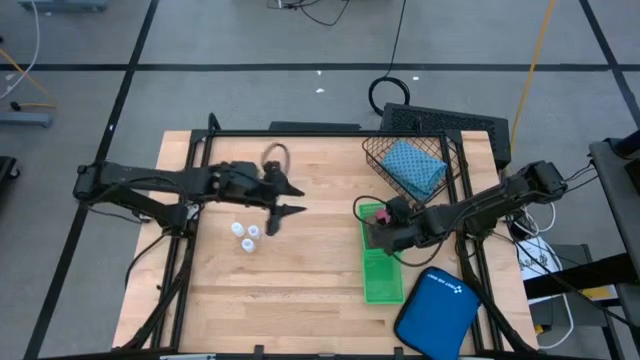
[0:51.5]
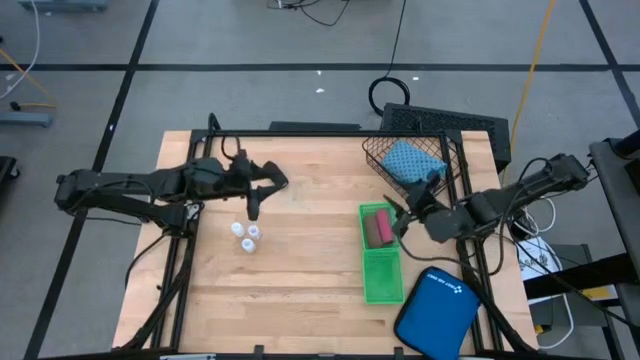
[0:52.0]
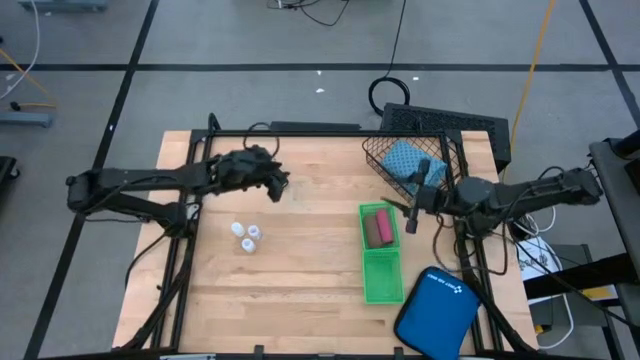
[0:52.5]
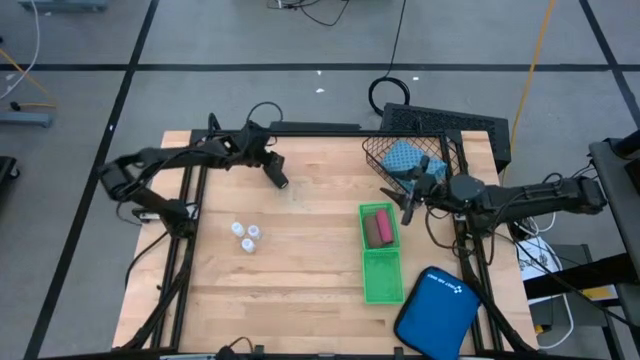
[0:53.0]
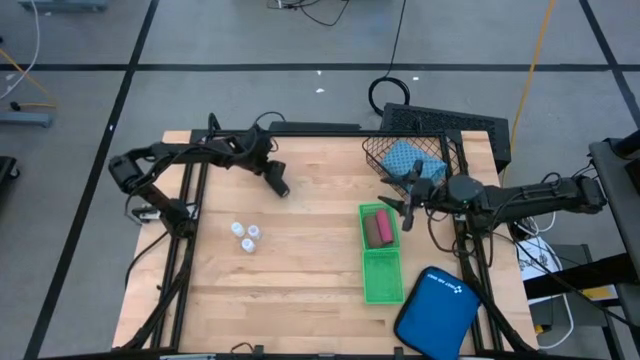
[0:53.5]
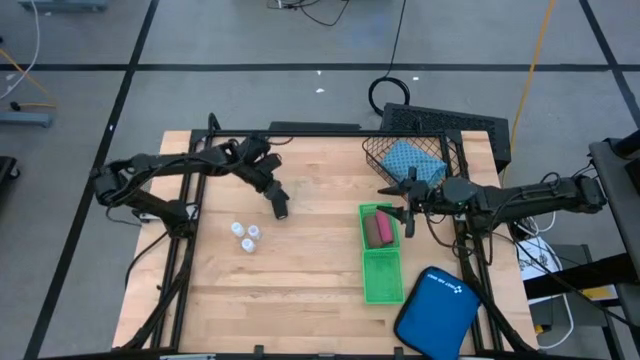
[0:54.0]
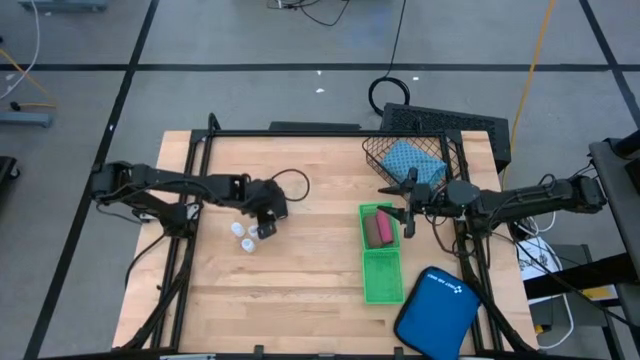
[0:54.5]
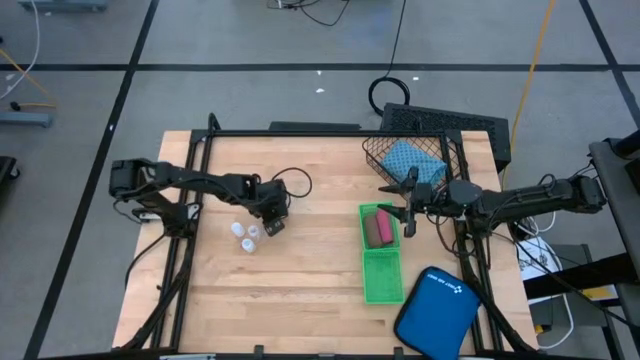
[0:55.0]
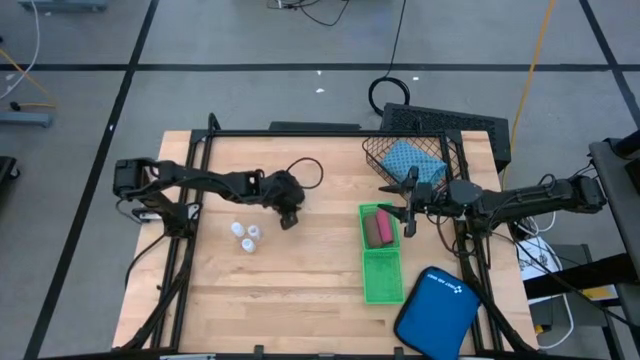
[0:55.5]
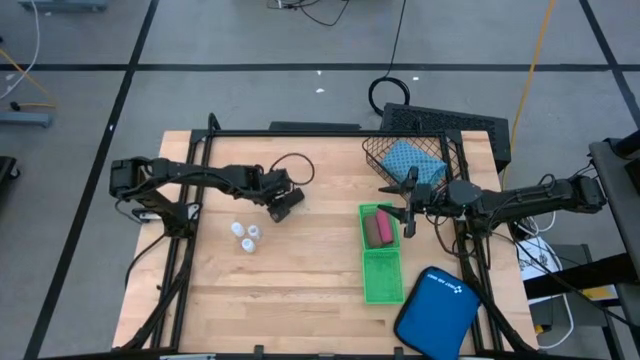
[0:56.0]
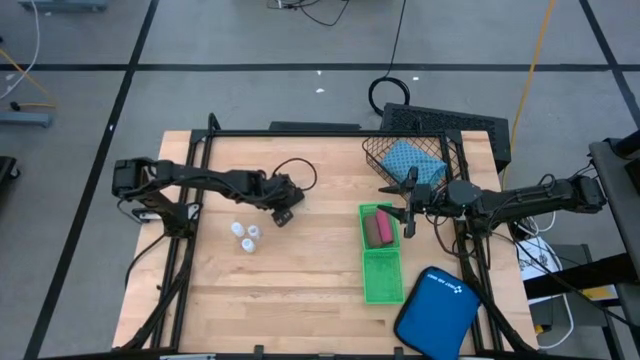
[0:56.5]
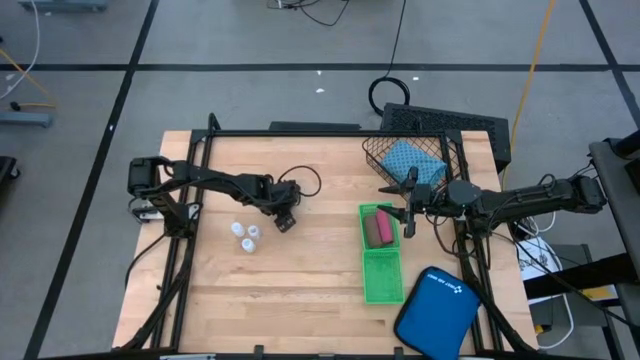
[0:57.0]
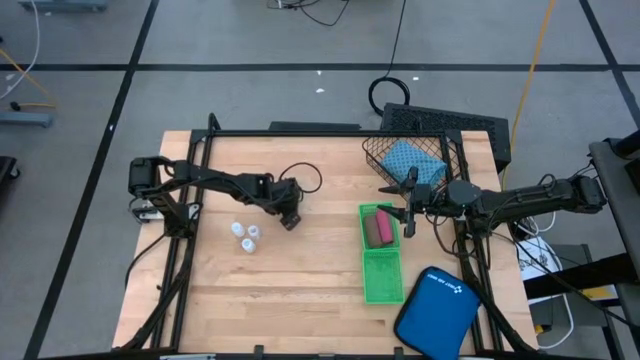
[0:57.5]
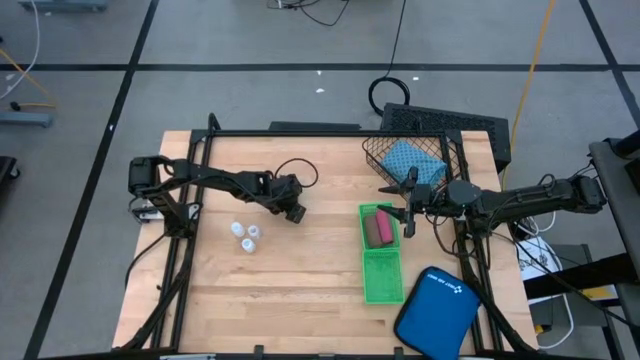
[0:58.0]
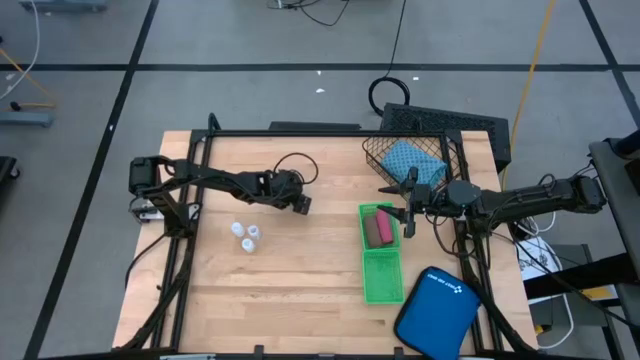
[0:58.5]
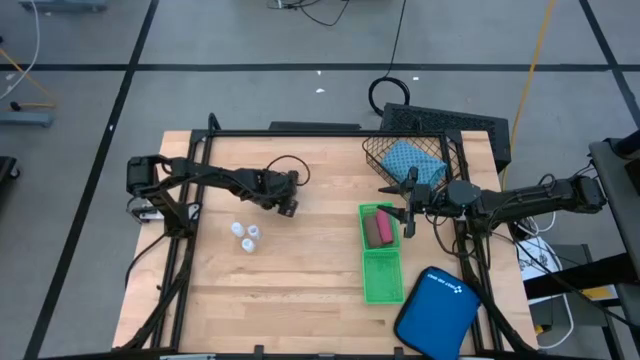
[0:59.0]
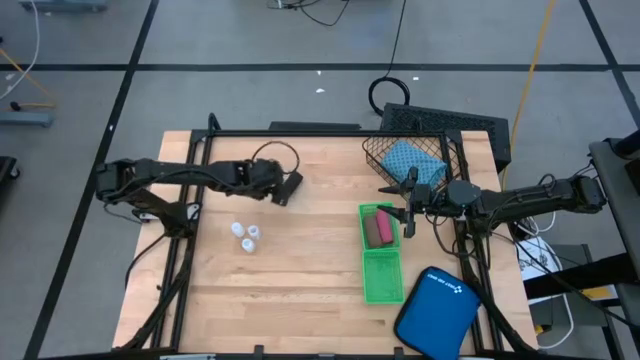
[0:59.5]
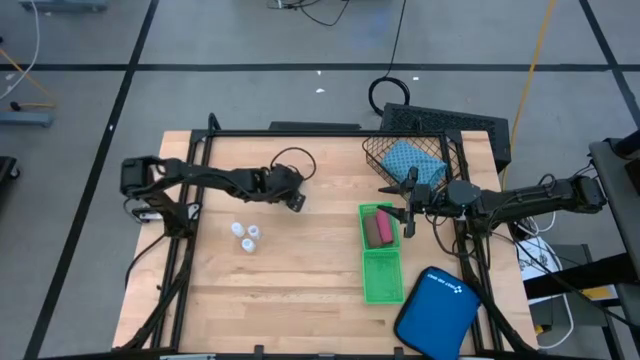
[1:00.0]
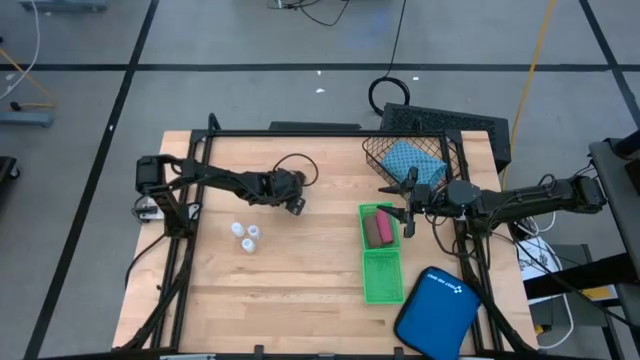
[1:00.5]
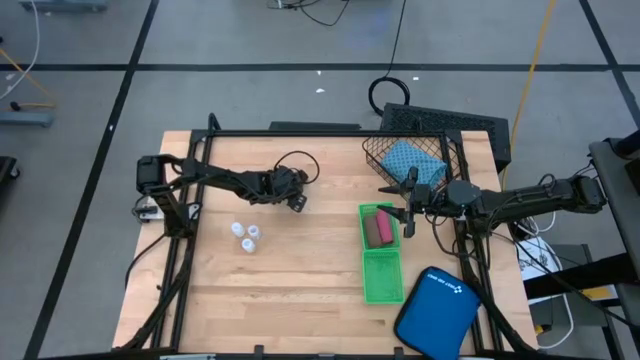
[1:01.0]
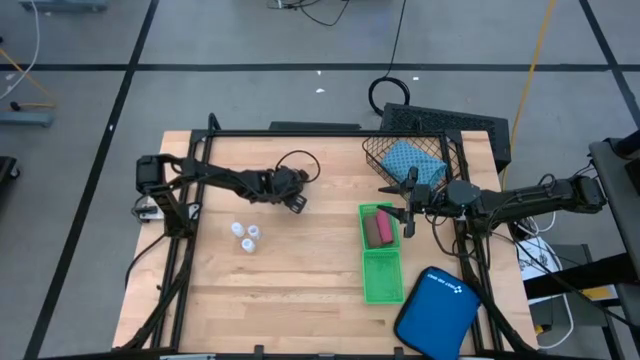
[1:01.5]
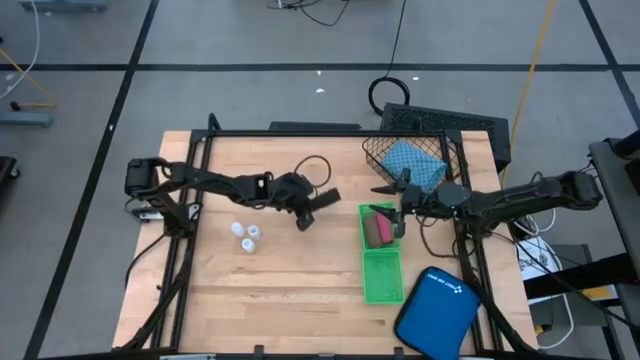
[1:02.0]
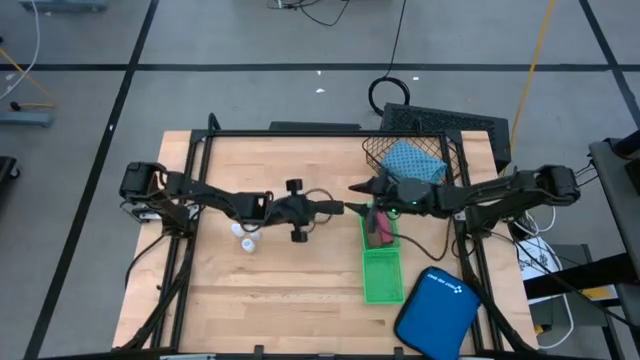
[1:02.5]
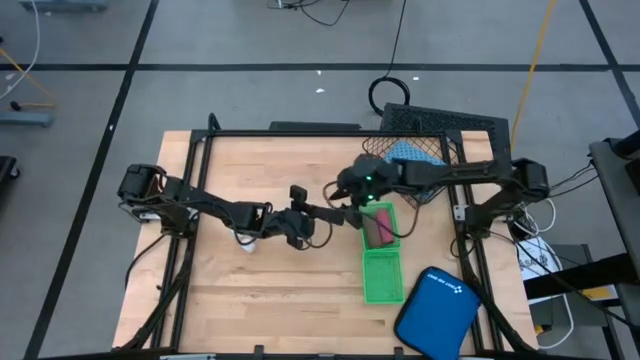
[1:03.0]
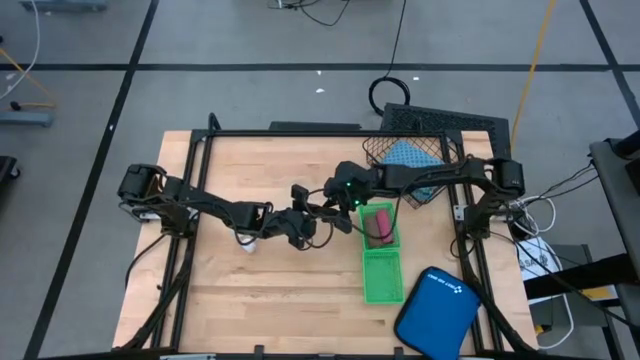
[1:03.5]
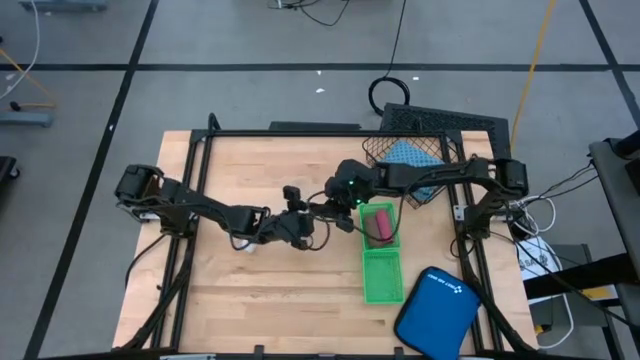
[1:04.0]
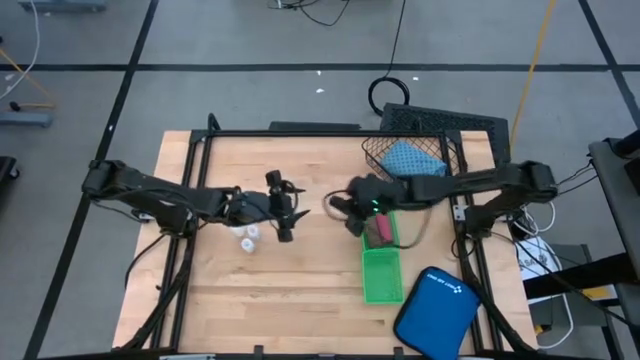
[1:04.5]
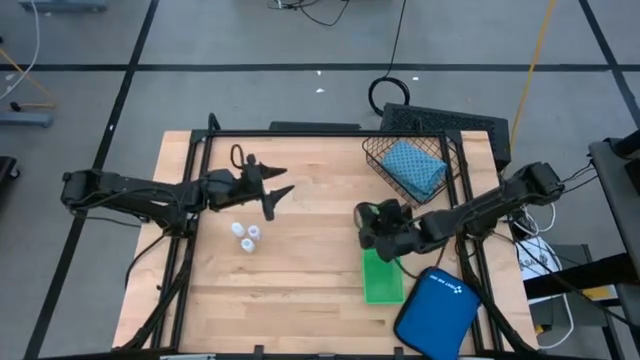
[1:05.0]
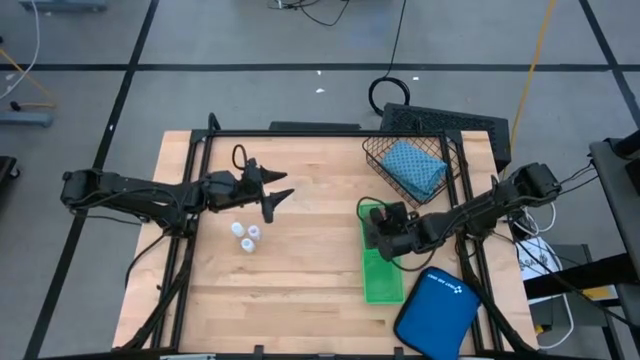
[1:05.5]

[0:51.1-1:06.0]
Task: Pick & Place Medicine items
Put the black bandage into the top green basket

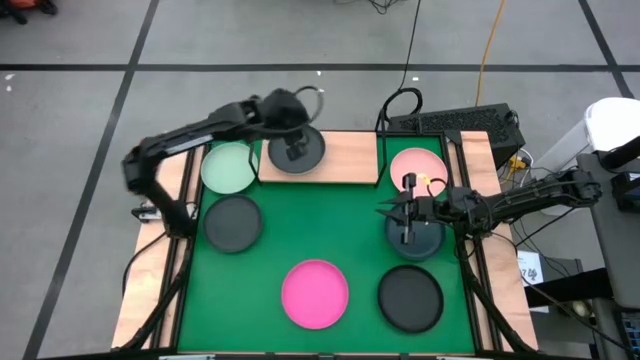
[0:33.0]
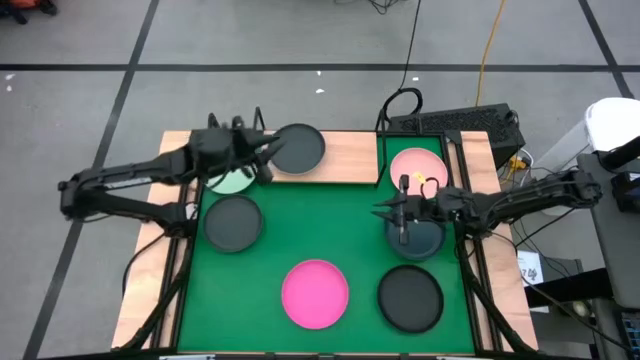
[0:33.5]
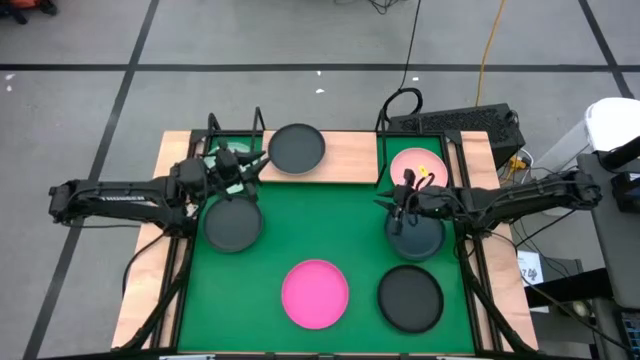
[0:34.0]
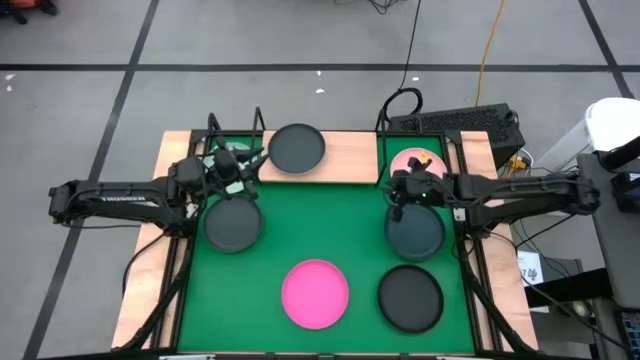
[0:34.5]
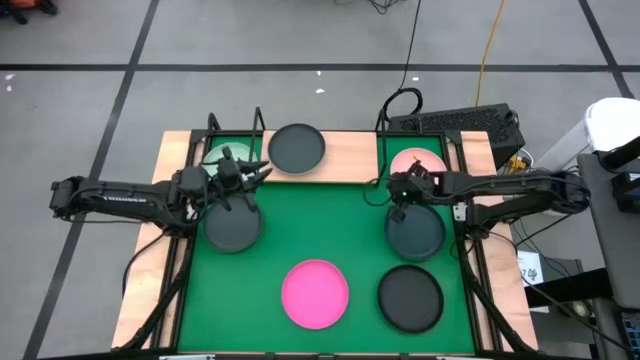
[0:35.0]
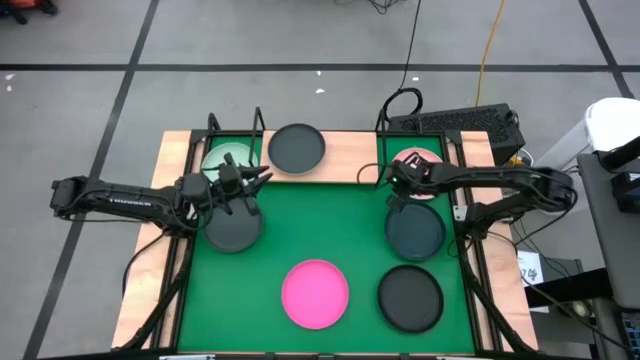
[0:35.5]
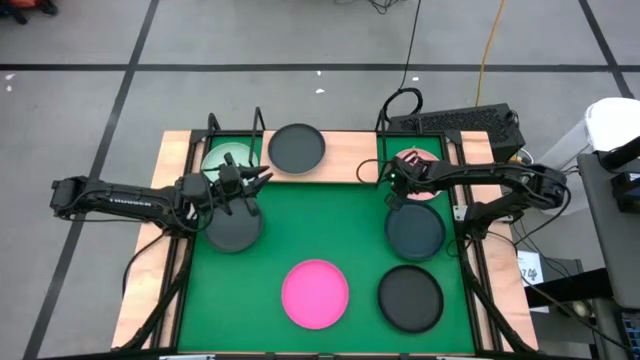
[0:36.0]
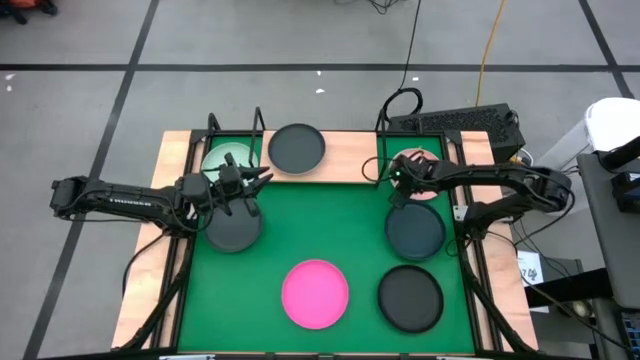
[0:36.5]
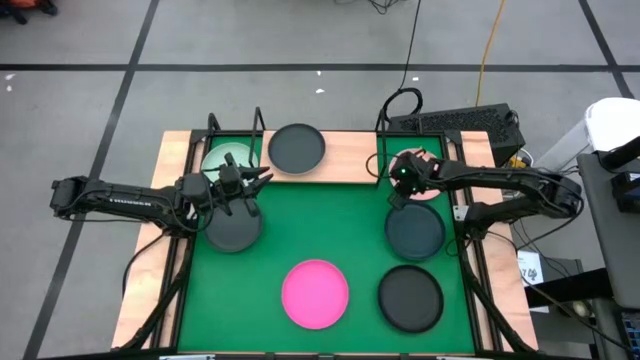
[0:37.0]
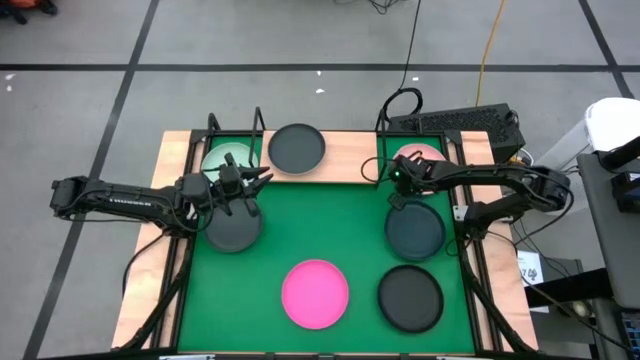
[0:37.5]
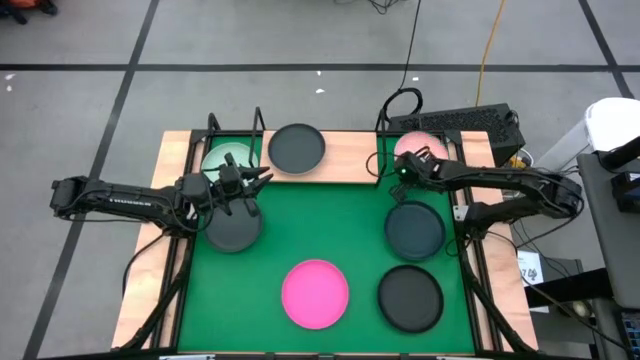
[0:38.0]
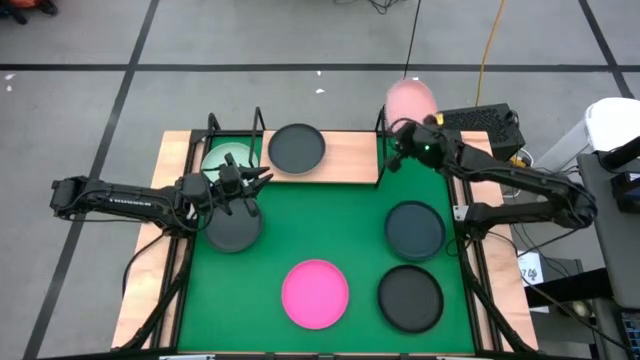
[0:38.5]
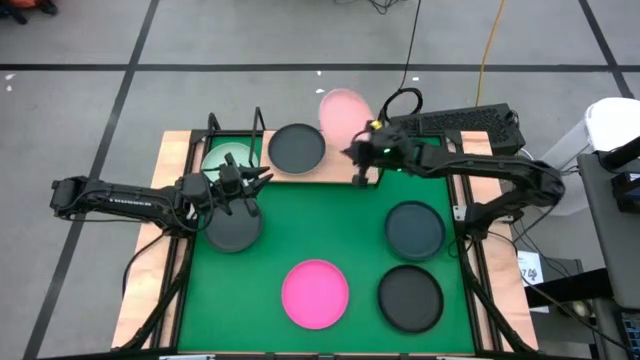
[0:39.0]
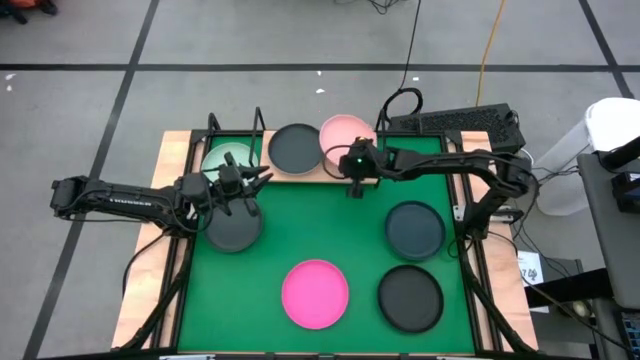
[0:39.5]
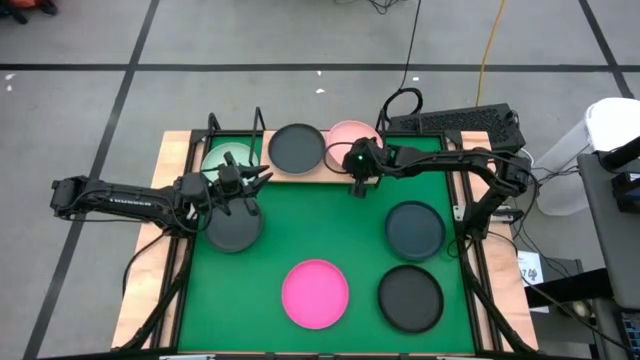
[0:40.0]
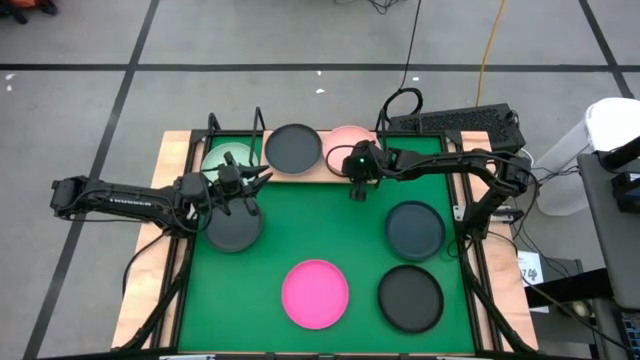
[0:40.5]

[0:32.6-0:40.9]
Task: Place and stack plates onto a shelf
Put the light orange plate on the shelf
